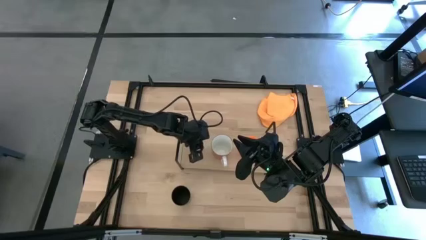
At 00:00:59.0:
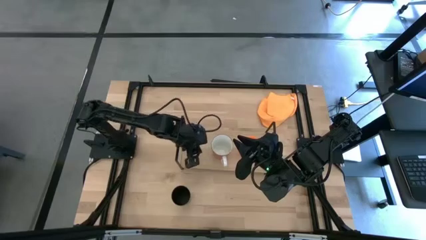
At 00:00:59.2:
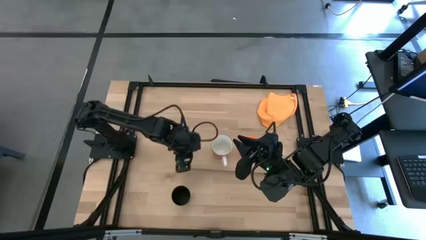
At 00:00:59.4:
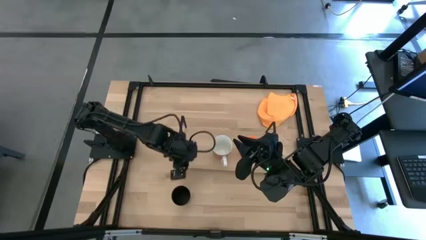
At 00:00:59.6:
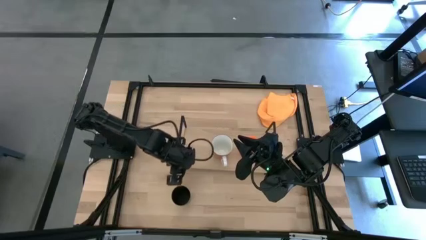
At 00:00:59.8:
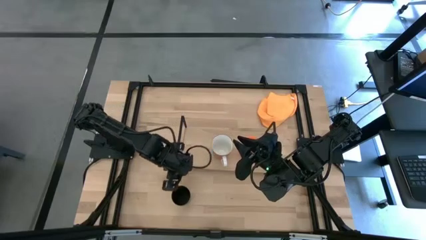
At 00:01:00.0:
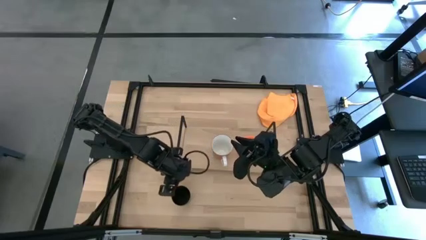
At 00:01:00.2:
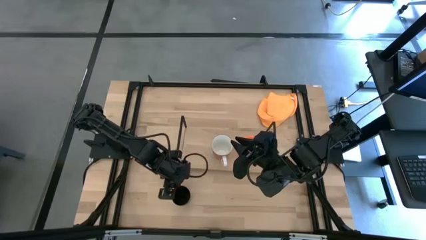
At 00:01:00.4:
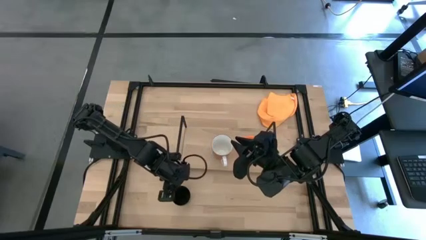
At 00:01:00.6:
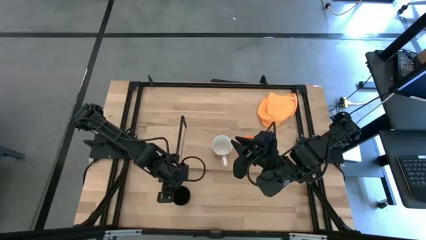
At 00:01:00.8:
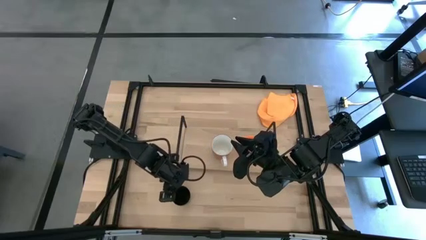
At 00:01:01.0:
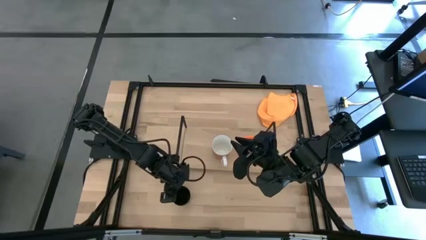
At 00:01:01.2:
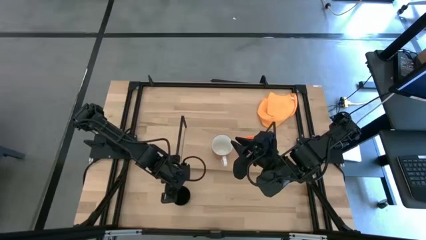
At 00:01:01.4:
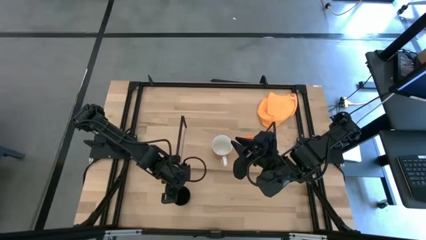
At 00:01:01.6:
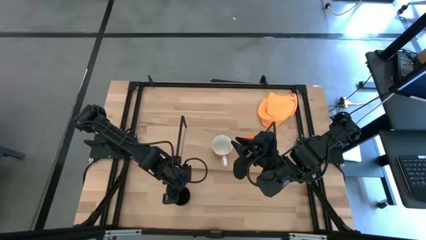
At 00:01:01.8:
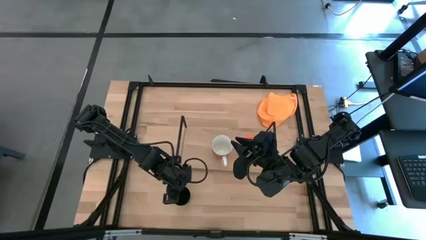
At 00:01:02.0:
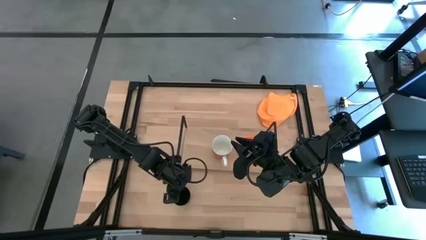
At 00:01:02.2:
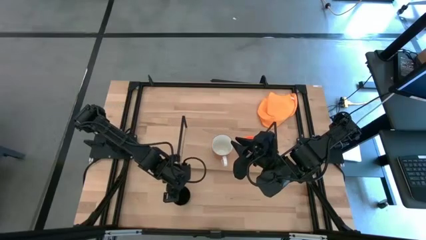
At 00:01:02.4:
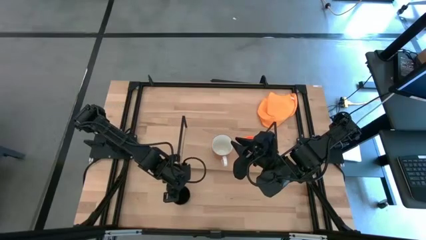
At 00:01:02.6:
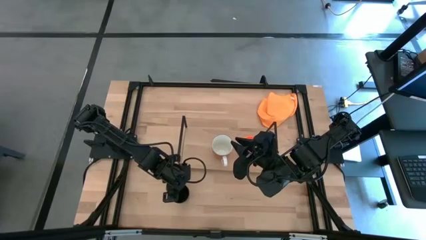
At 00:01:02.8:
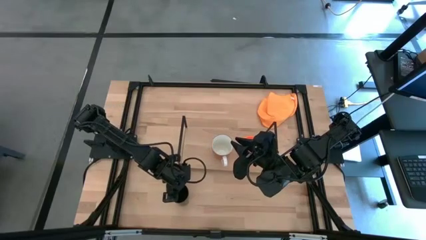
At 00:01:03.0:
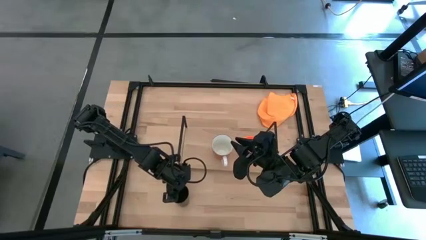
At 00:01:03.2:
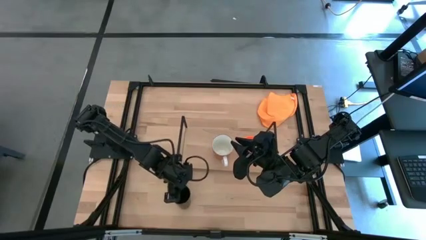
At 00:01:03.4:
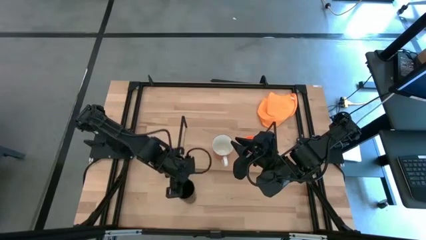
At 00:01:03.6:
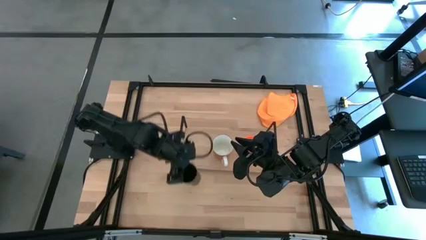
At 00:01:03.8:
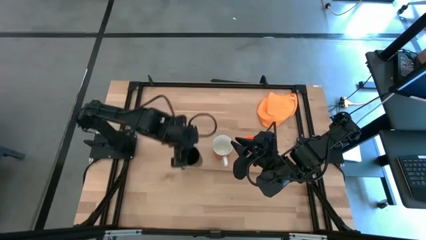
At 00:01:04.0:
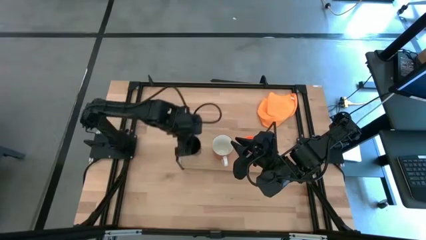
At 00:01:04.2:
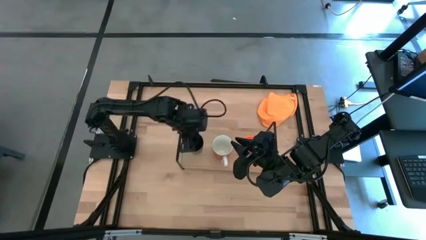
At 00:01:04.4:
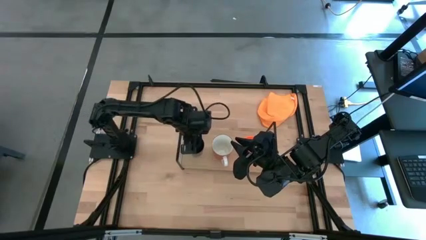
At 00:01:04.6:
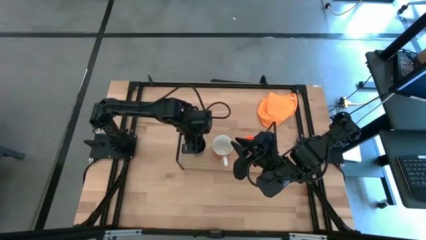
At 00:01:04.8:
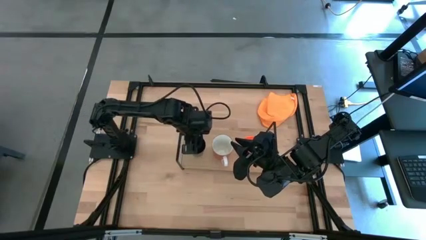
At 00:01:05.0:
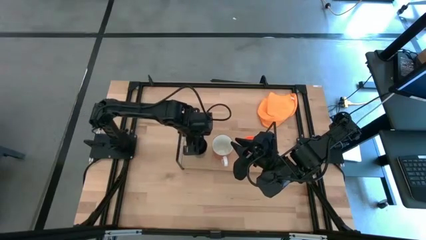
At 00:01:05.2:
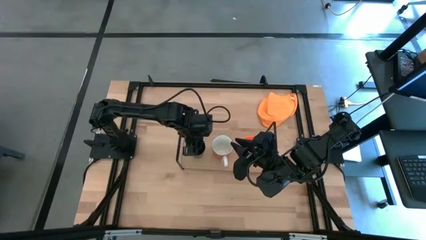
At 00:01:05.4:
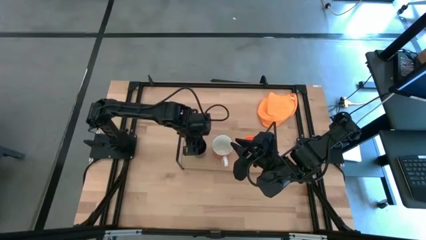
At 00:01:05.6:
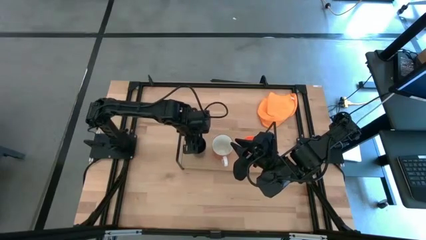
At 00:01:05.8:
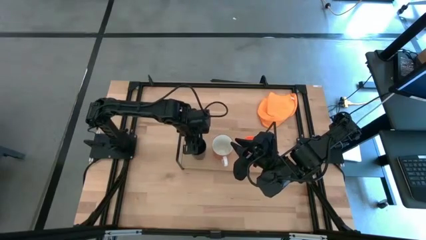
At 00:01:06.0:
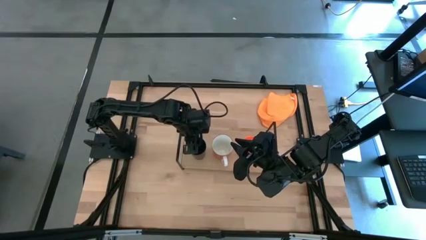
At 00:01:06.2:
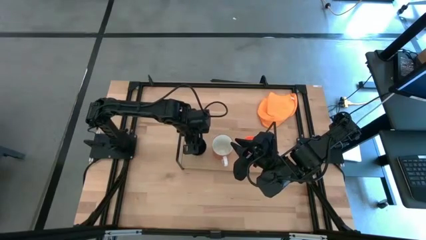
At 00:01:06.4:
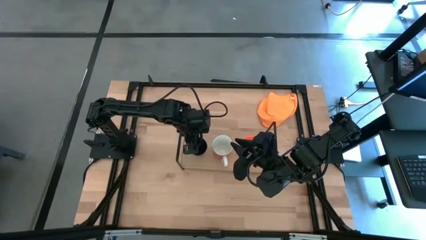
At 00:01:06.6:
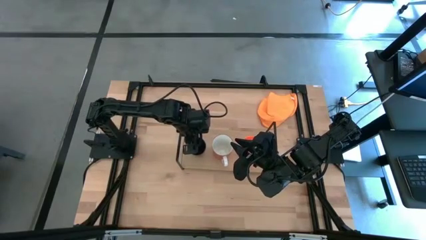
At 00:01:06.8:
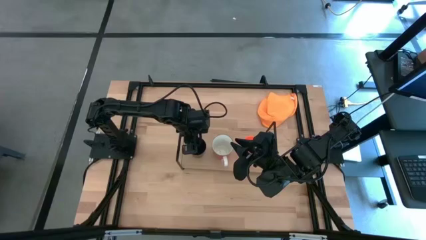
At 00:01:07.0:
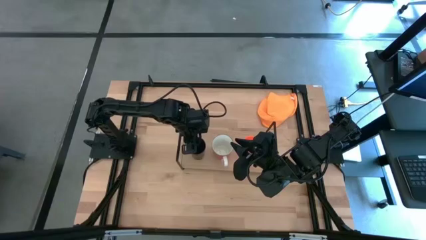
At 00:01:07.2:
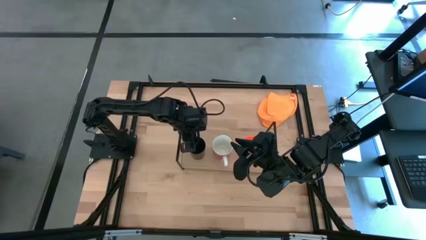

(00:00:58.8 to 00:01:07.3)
Task: Stack small to large cups/mugs on shelf
Put the black cup on the shelf

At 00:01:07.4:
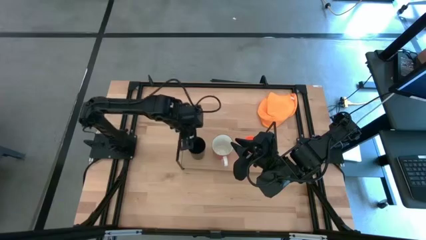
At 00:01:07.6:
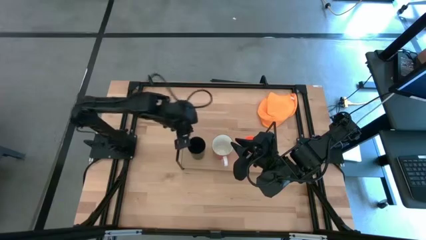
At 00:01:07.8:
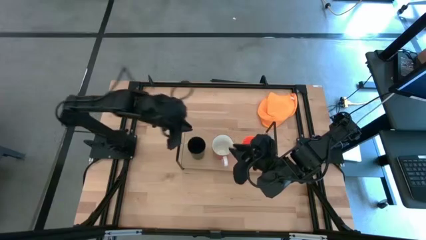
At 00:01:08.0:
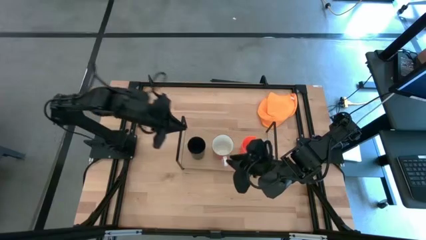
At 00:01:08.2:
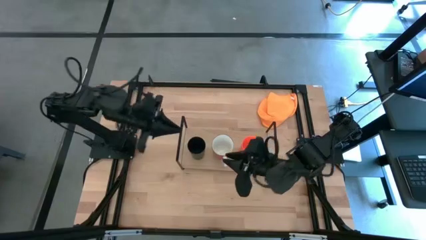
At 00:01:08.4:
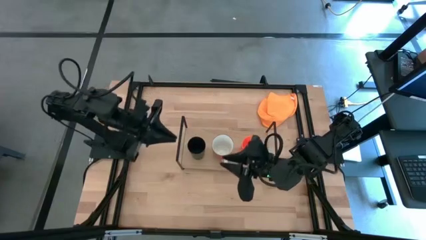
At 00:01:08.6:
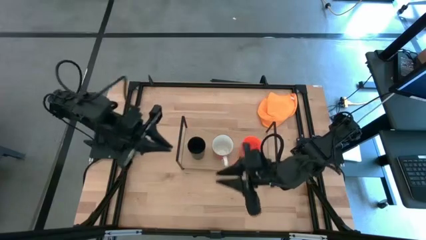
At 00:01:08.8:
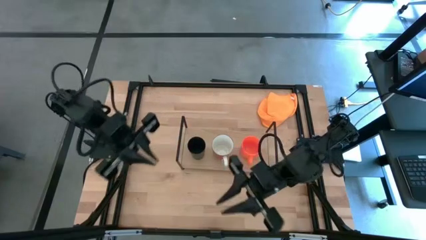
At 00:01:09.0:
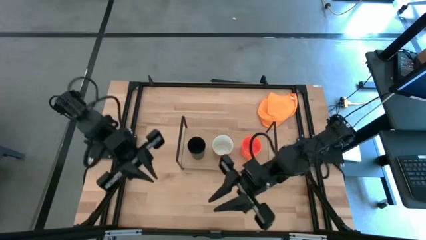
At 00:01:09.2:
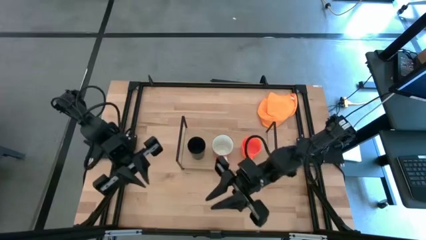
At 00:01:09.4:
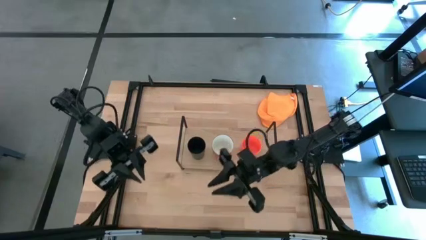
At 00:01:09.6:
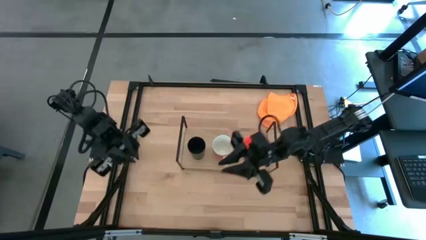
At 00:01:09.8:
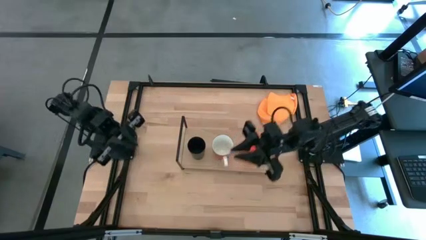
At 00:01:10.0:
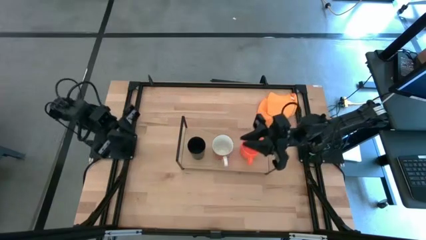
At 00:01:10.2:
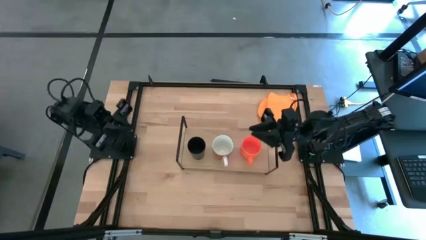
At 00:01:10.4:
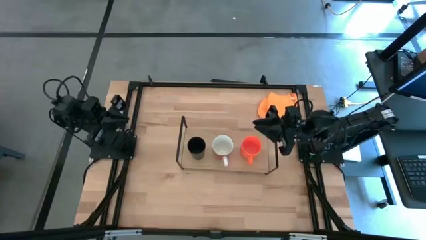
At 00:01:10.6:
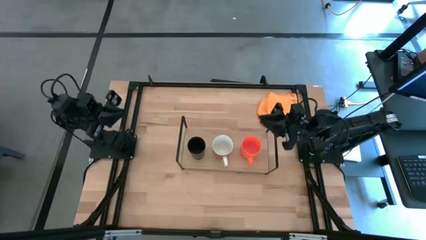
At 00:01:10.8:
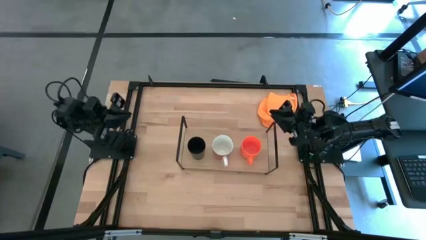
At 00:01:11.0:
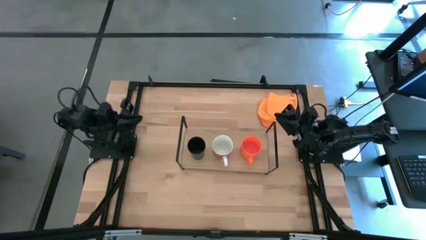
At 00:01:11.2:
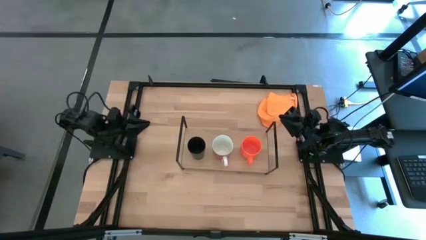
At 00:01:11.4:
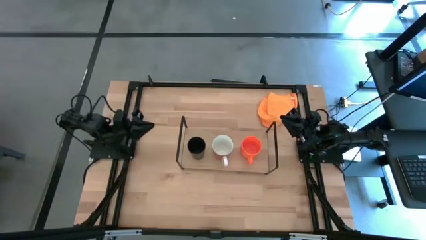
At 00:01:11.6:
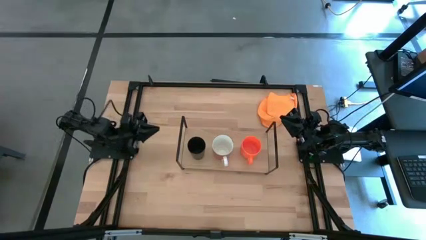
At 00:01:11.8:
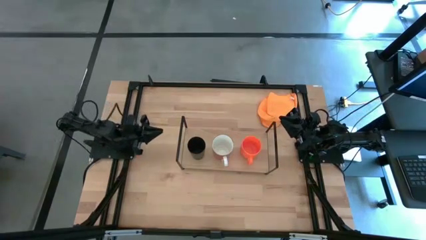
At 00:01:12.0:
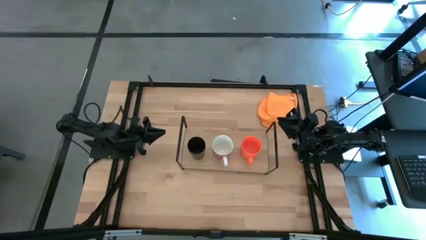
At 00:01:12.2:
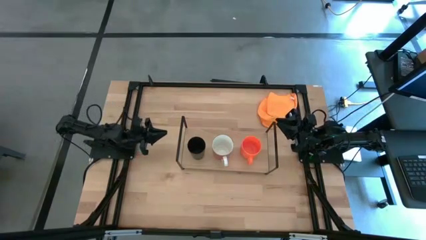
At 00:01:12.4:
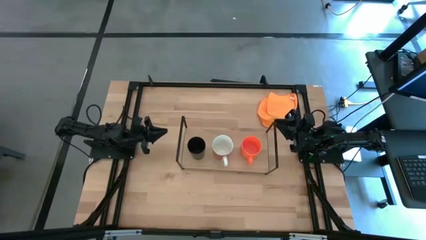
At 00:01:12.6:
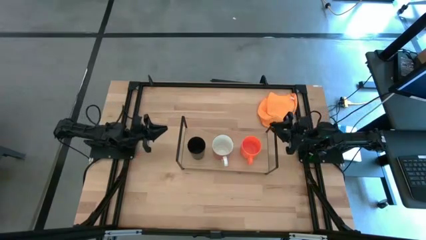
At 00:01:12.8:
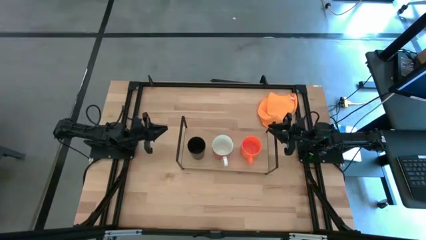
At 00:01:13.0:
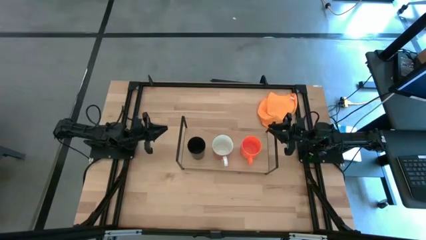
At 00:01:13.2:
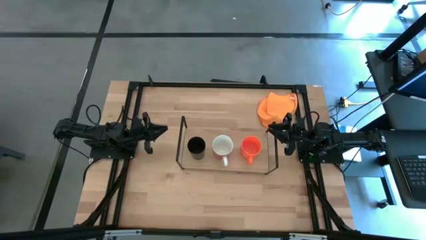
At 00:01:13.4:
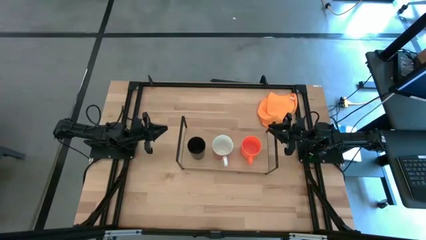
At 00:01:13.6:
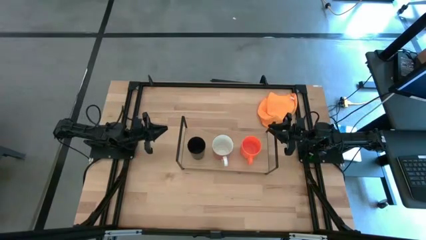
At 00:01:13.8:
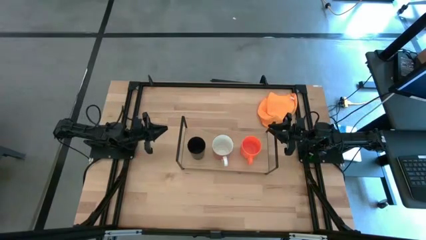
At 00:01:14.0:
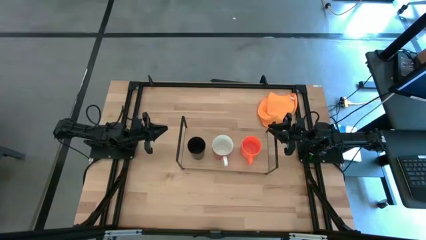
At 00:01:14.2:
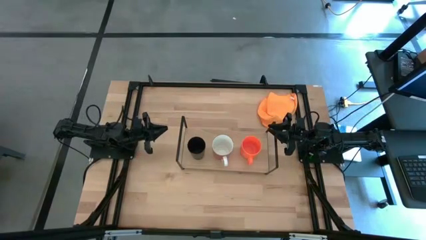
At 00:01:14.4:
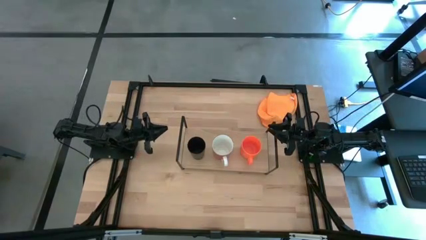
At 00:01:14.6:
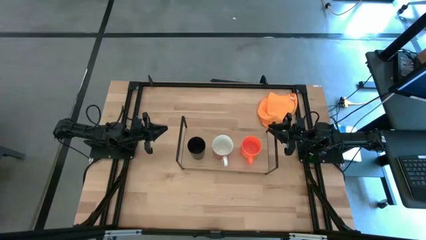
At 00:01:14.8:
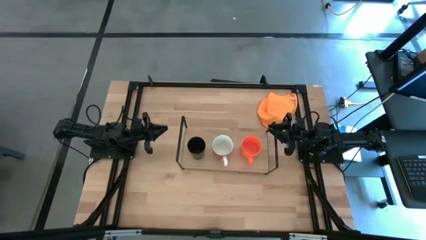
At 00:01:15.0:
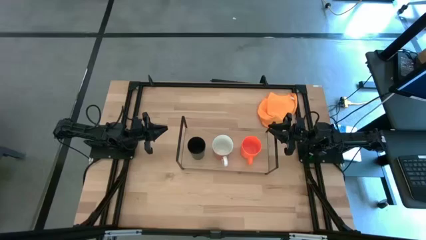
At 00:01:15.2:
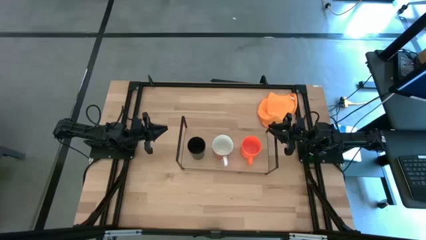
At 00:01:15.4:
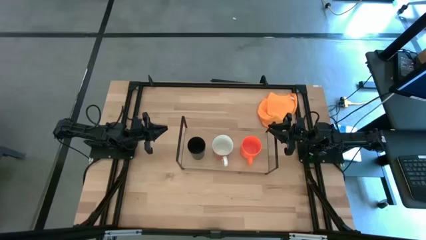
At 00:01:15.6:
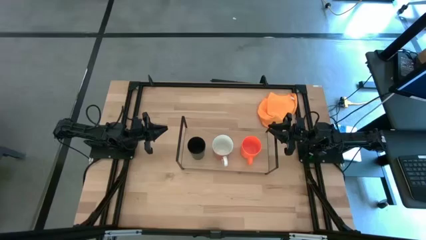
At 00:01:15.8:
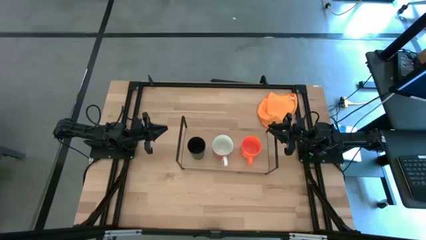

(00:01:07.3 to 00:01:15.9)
Return to Home Position
